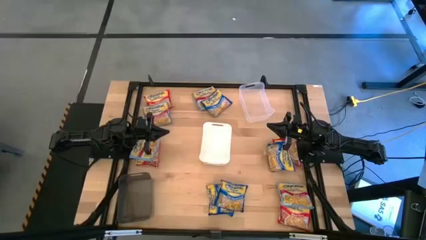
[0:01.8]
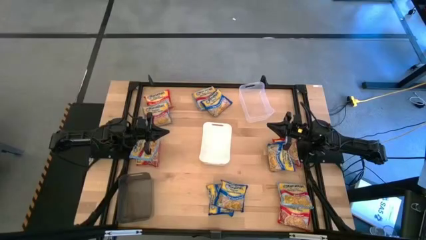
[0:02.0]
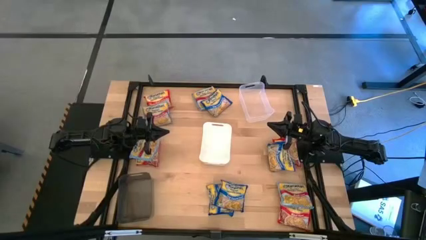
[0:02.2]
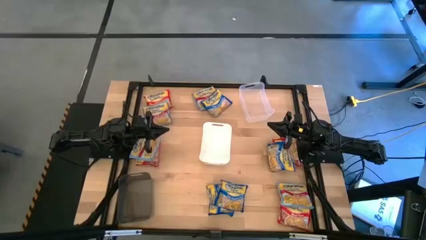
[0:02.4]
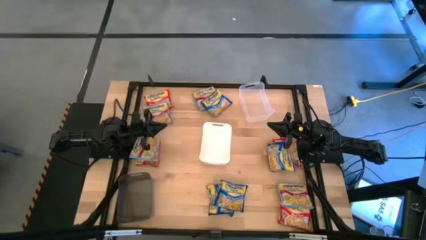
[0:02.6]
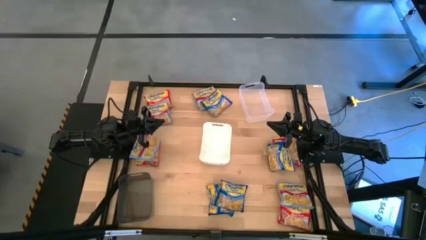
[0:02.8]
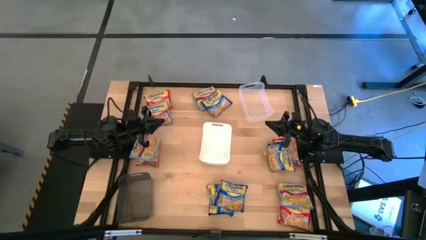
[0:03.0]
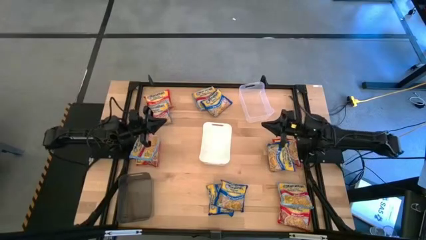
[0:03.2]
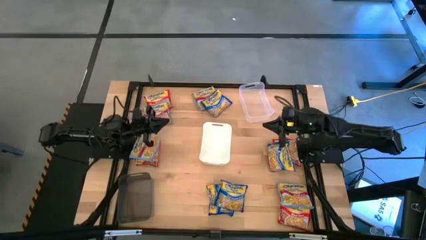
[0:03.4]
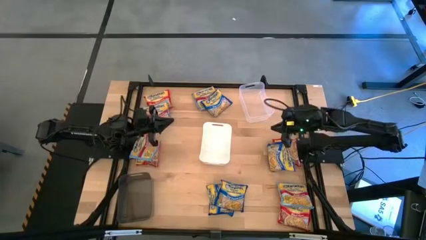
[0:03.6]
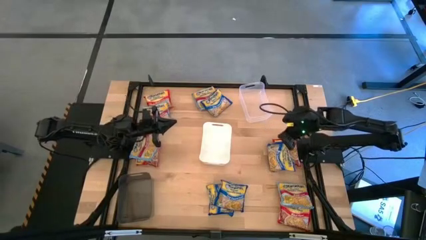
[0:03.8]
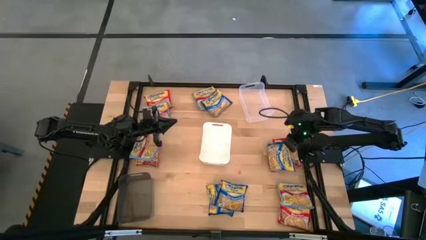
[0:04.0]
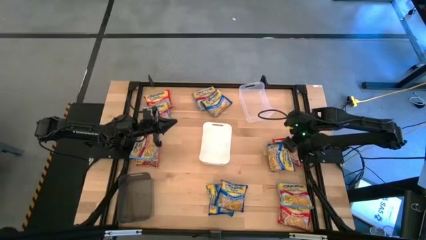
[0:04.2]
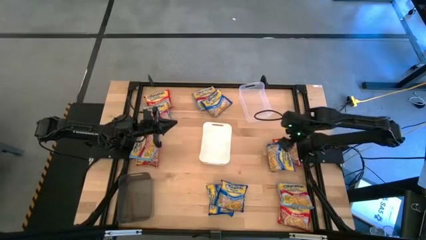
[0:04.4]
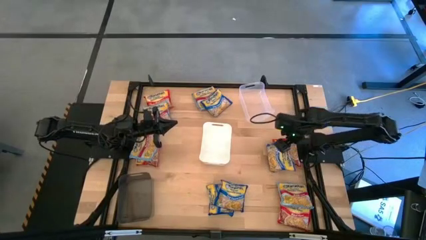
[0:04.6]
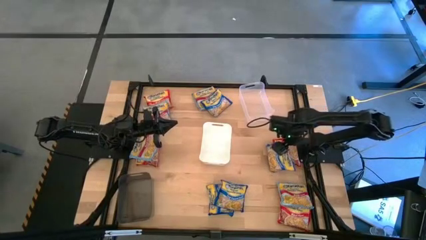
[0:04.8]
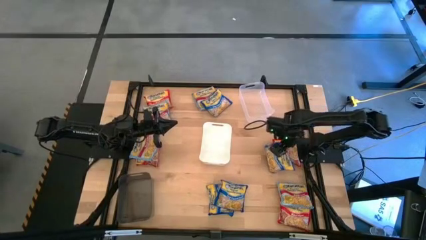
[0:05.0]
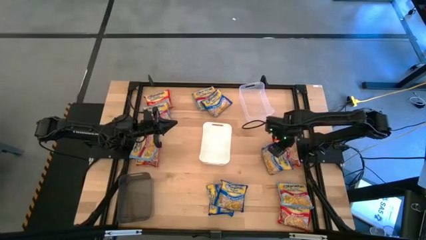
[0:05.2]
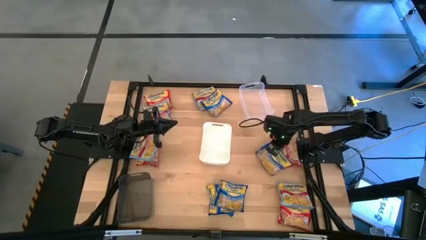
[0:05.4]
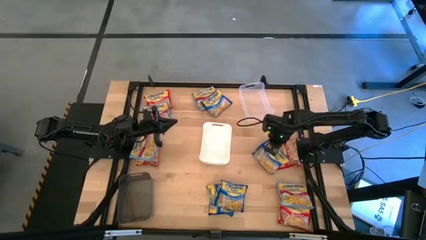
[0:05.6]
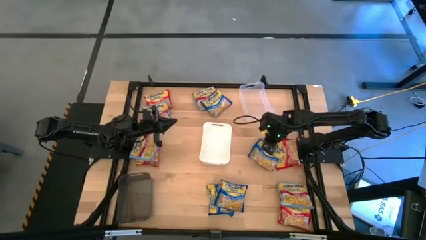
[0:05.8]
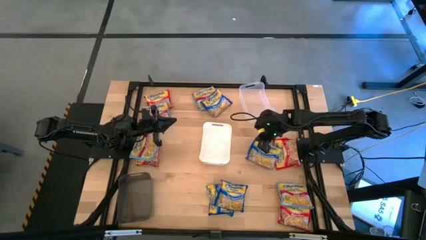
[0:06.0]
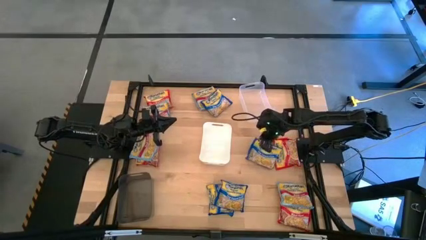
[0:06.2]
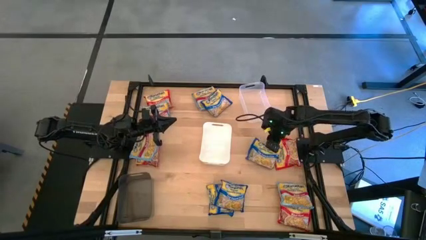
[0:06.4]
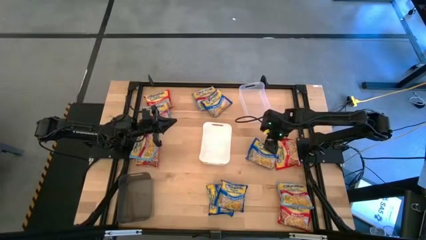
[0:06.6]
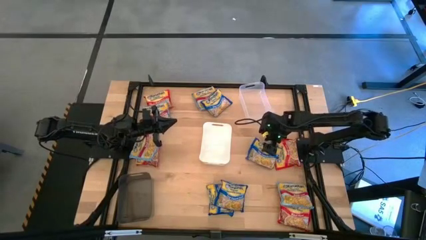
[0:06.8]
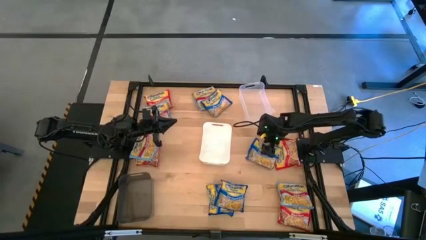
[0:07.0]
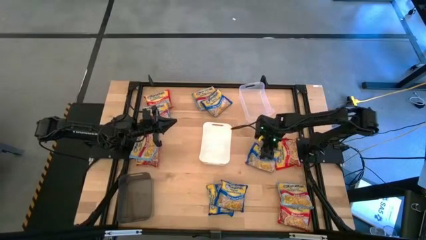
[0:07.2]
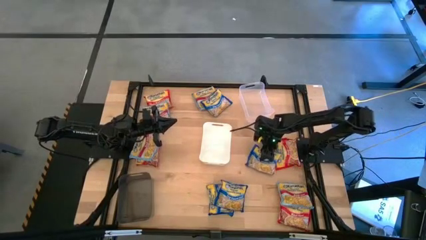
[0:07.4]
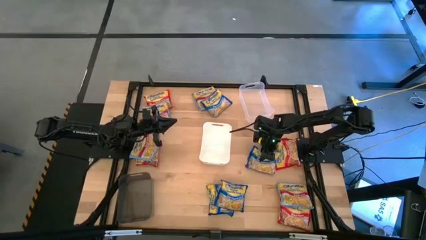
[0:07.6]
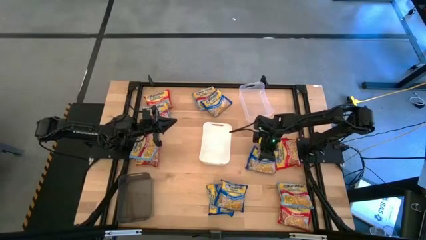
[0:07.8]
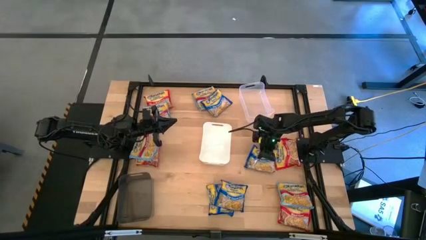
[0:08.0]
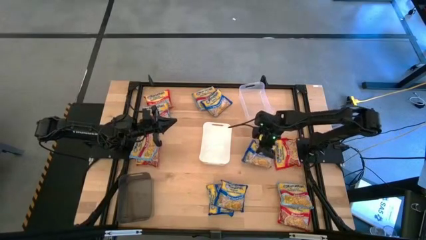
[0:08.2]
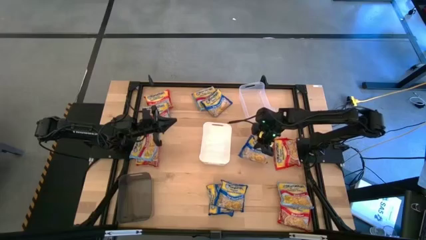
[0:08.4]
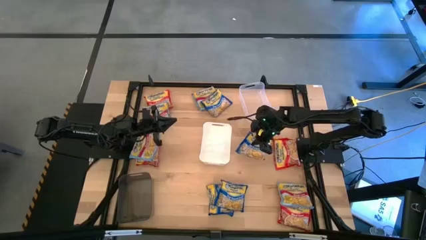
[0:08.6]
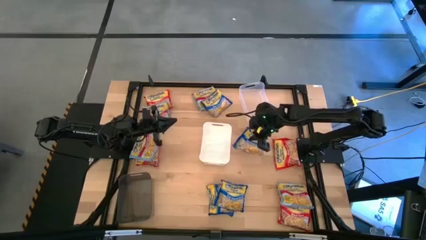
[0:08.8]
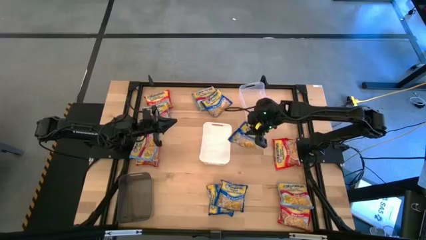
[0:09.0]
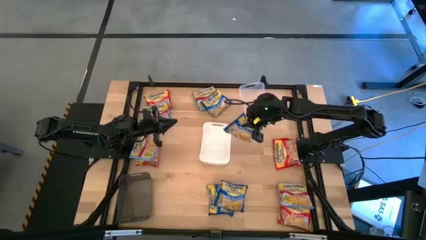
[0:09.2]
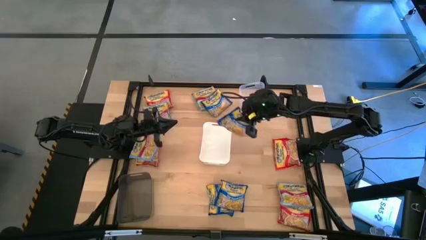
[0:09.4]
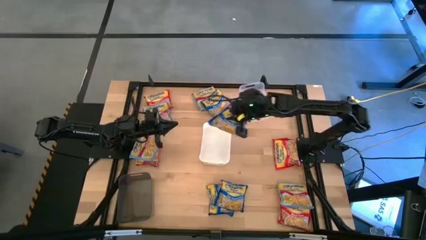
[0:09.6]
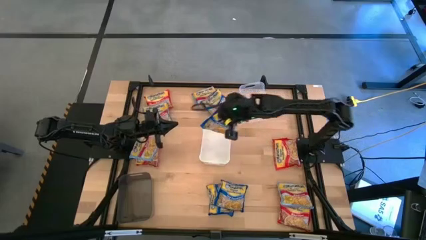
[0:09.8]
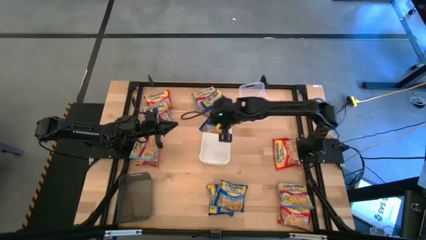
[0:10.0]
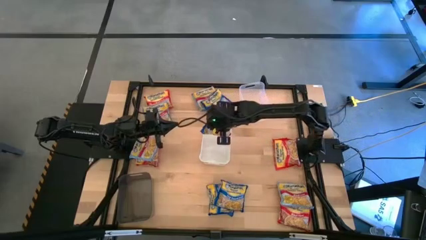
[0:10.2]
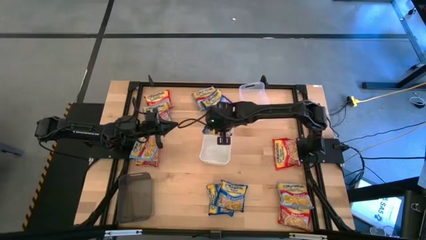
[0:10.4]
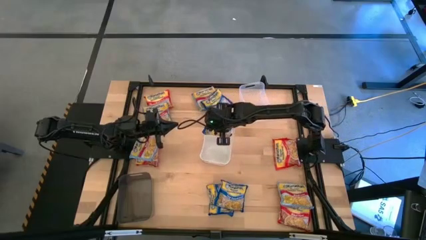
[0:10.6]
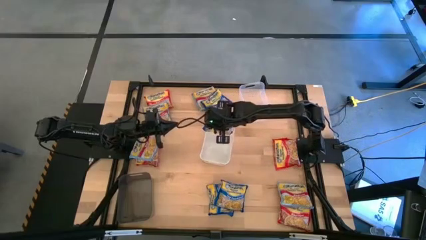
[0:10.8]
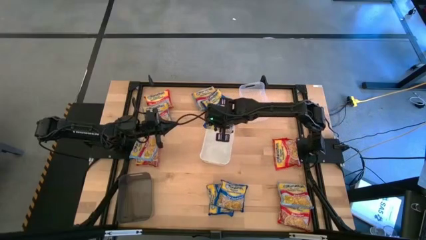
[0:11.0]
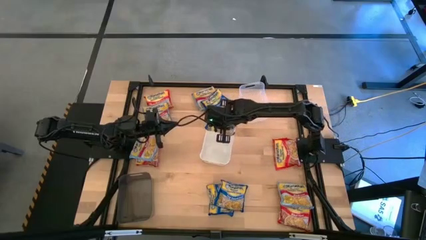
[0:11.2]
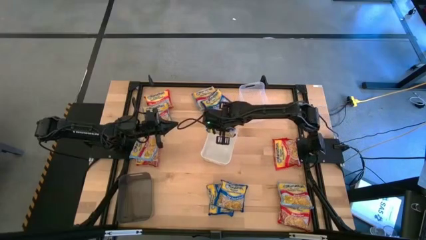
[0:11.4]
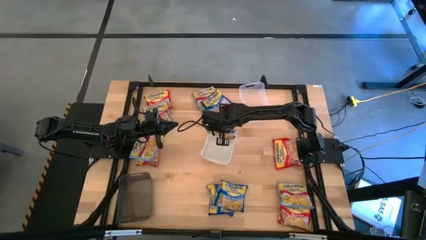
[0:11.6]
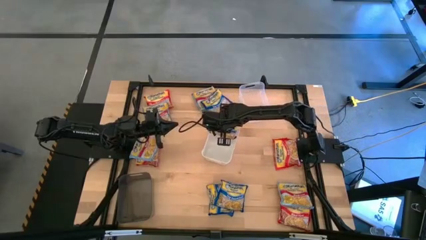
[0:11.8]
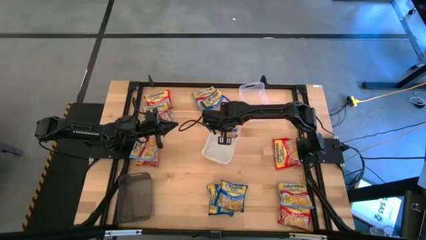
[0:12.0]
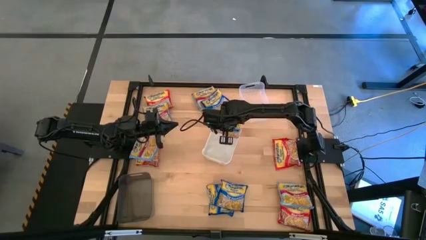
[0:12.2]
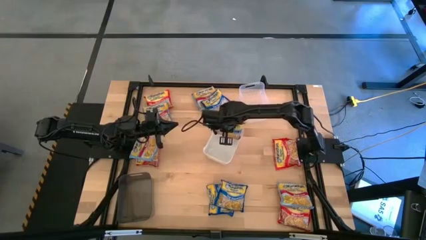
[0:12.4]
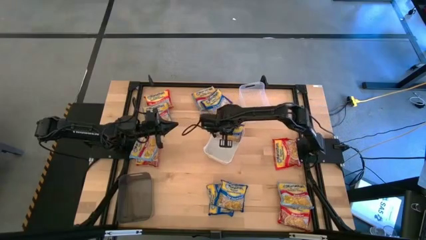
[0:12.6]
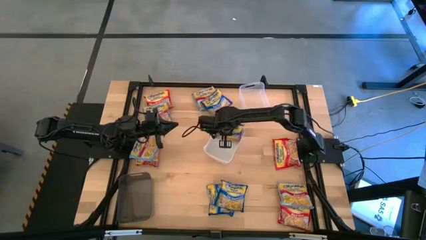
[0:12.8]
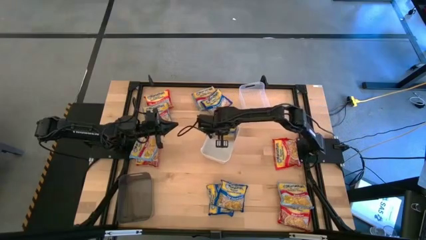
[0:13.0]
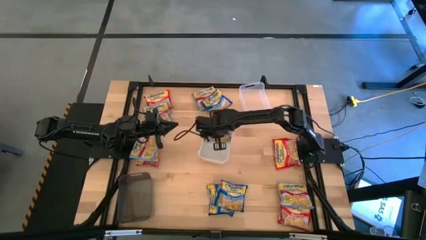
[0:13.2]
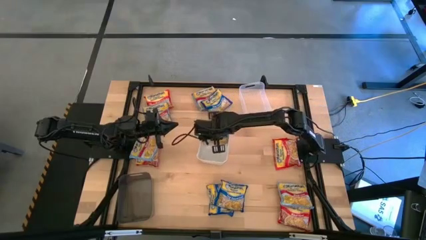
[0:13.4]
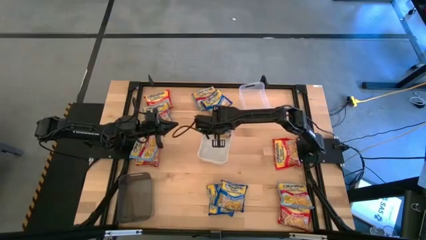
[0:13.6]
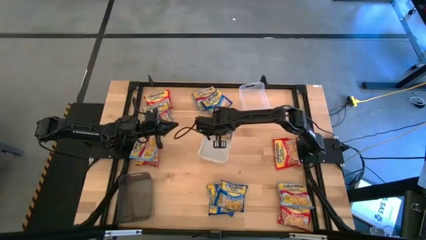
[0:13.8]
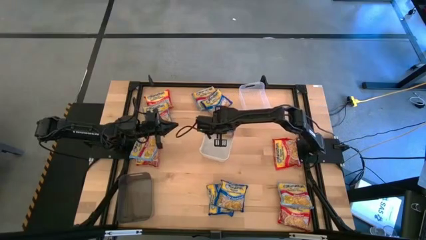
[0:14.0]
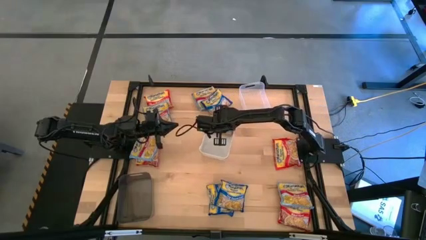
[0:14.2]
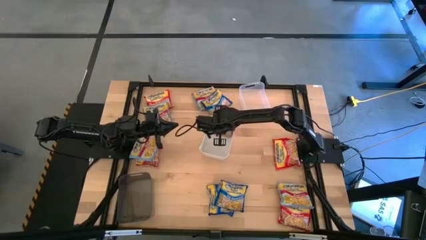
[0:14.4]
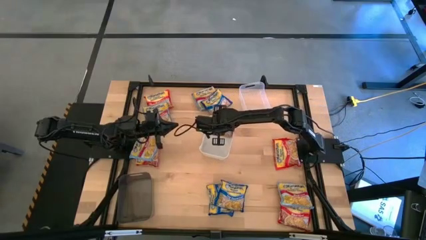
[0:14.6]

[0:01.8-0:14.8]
Task: Sort Maruchan noodles
Put the blue noodle pack in the white bin
